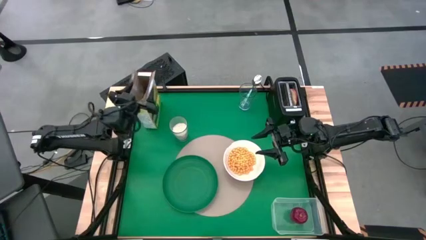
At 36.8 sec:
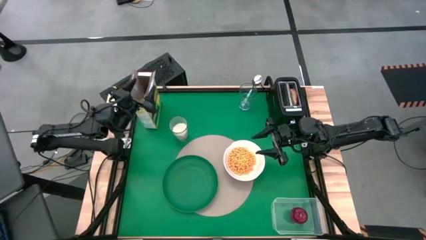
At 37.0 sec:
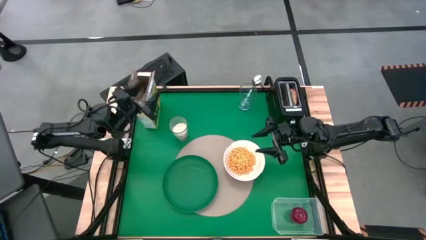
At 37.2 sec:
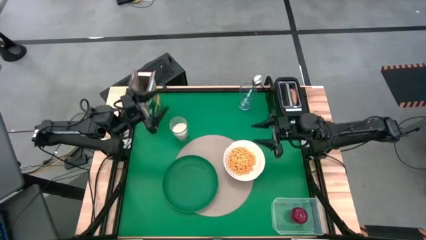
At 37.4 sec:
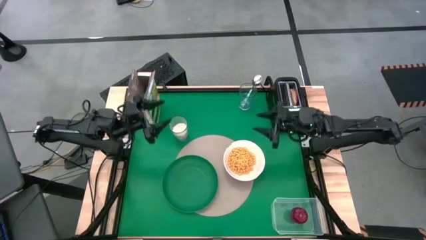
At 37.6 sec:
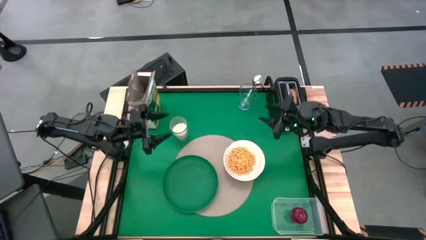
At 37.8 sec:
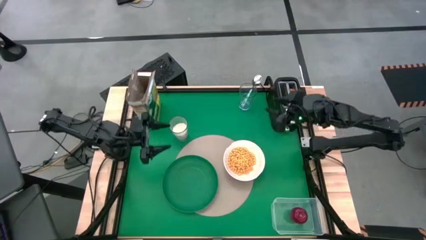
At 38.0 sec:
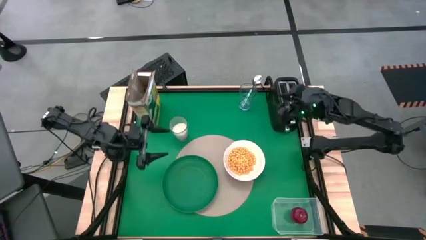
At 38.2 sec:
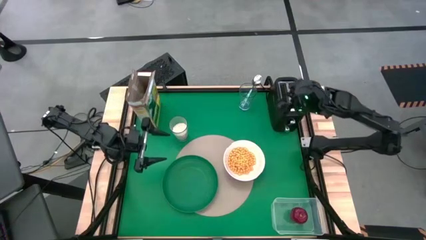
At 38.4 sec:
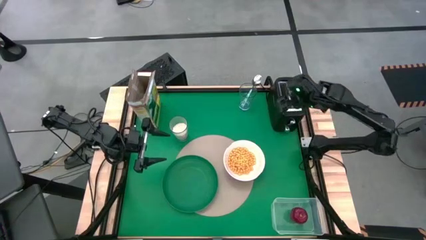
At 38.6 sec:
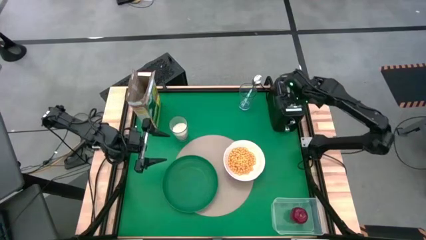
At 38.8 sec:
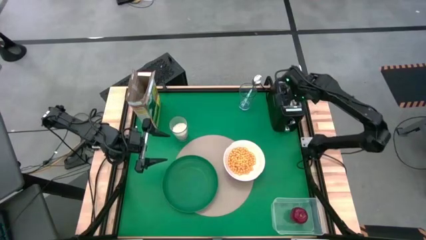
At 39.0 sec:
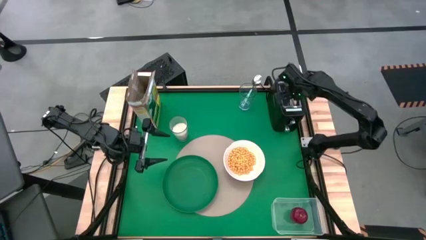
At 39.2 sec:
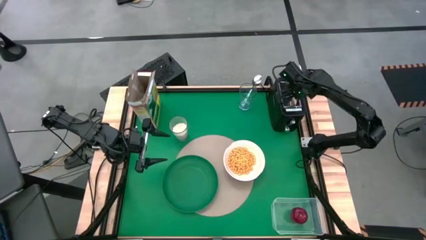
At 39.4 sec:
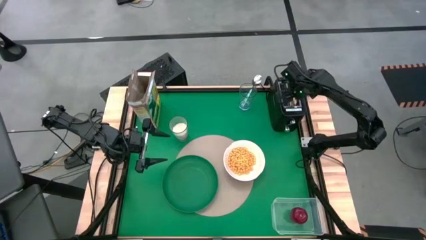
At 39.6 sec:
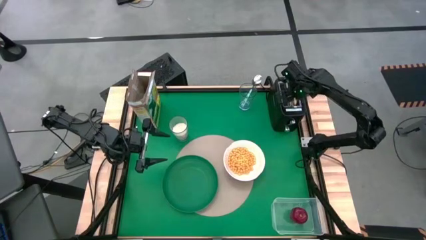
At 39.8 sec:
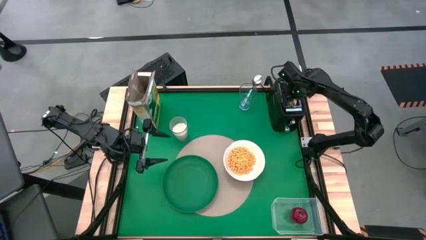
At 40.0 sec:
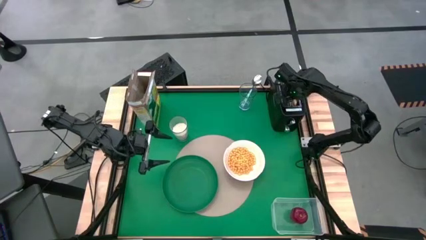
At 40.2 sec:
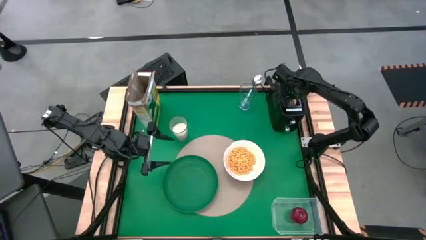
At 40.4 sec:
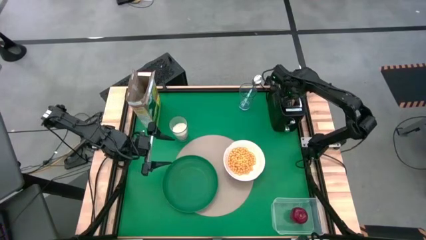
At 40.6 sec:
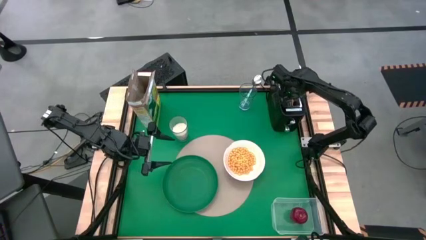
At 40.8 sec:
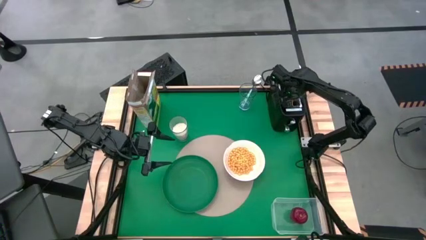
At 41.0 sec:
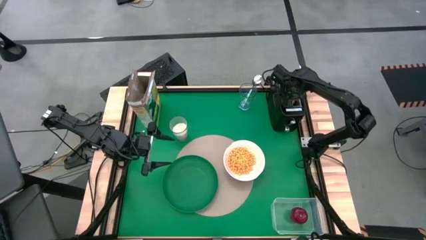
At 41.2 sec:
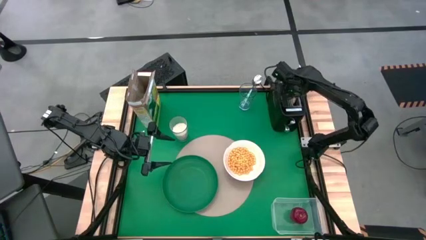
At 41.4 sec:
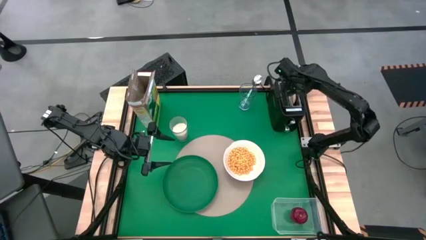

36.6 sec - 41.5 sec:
Task: Arrange a breakfast setting
Put the bagel on top of the green plate

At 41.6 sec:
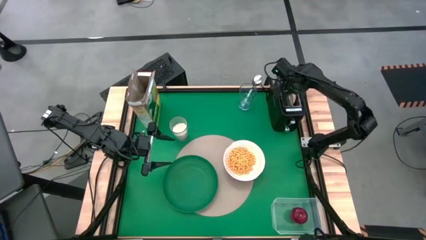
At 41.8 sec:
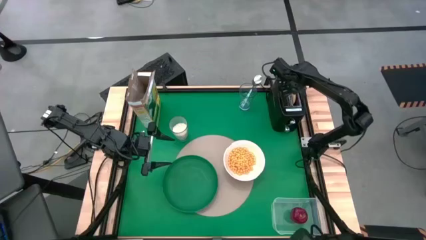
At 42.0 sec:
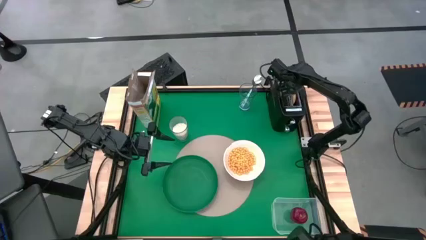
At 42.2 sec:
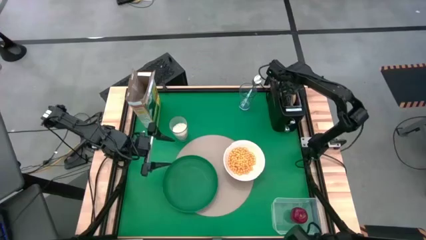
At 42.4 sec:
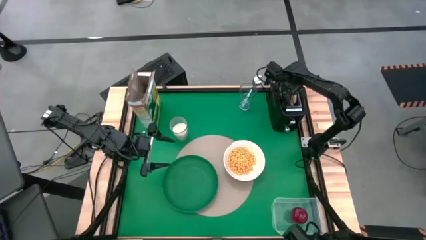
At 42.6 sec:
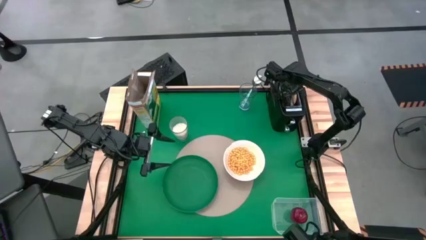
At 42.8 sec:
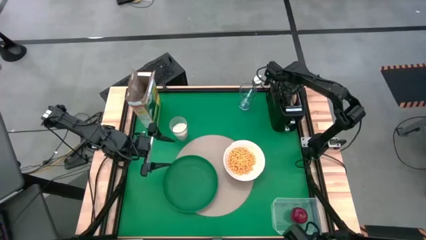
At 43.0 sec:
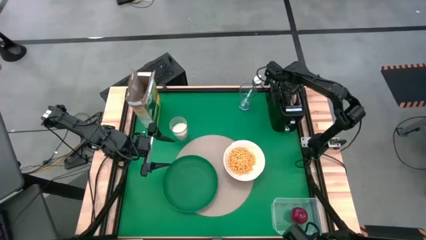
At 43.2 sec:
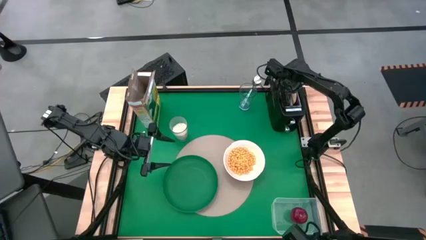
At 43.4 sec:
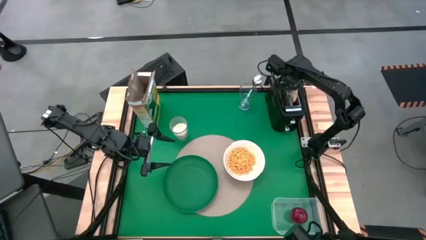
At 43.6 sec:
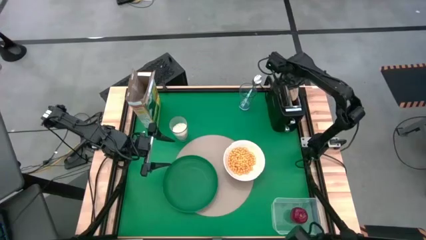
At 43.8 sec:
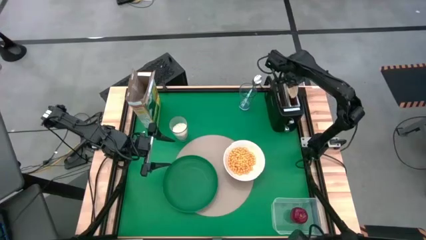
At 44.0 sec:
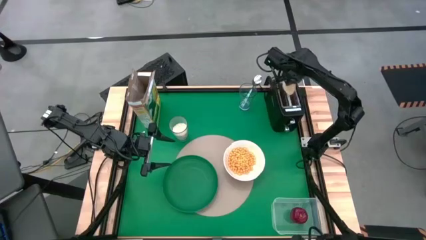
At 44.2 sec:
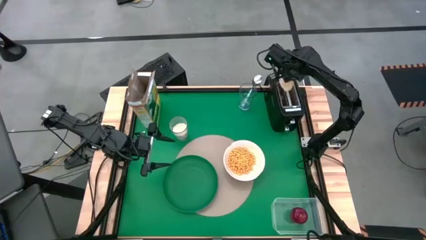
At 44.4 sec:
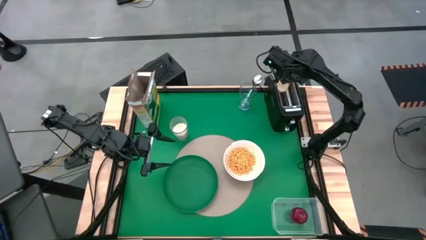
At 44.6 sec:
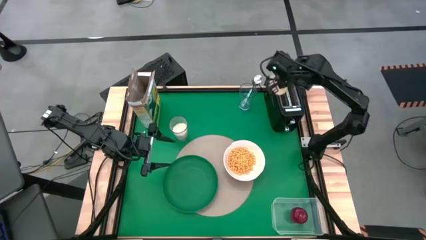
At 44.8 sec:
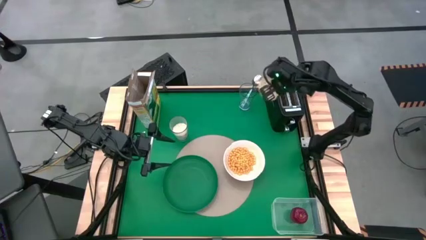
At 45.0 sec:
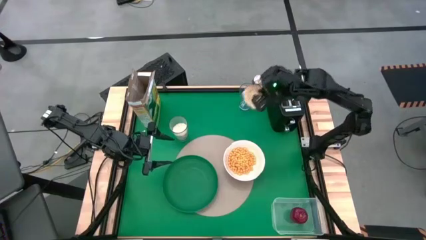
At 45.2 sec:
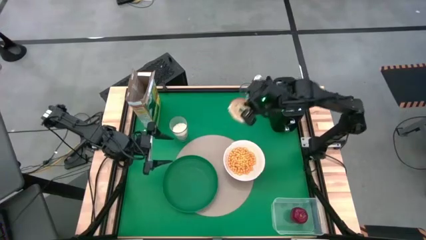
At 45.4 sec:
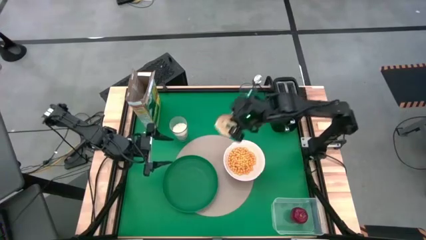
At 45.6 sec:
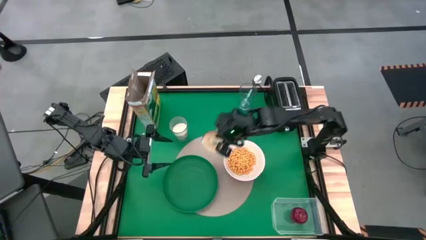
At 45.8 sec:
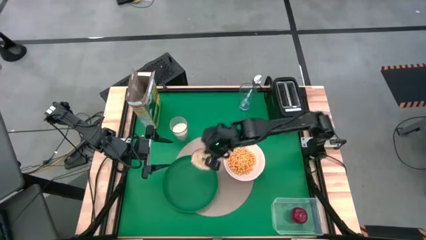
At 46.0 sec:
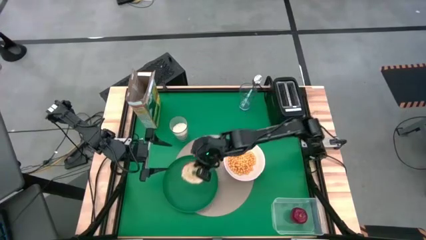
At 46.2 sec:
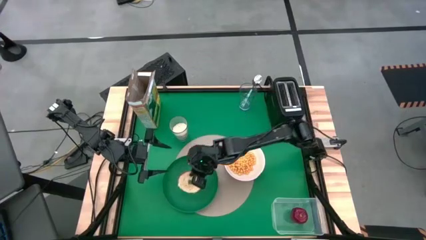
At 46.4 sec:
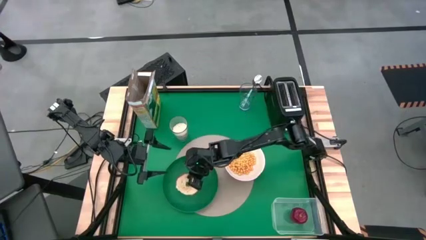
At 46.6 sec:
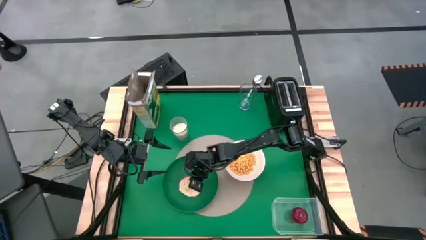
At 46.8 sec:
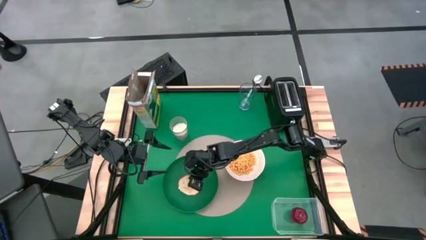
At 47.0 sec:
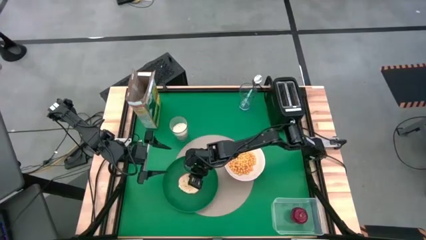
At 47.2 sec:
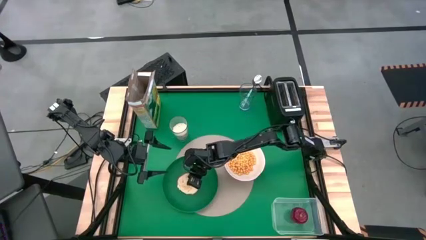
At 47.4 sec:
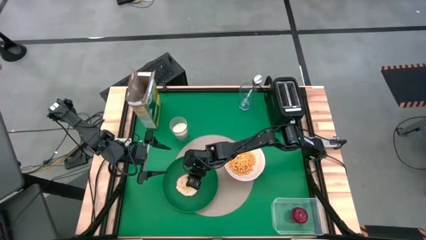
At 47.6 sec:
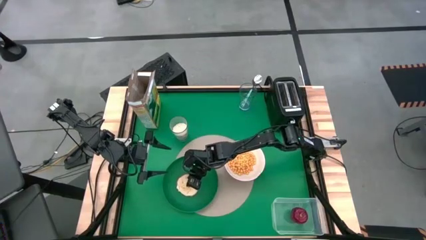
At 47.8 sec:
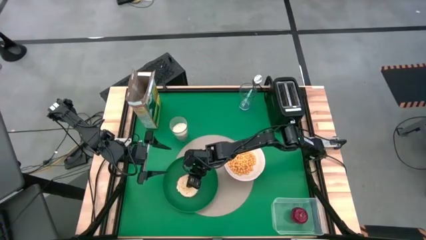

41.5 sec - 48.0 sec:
Put the bagel on top of the green plate

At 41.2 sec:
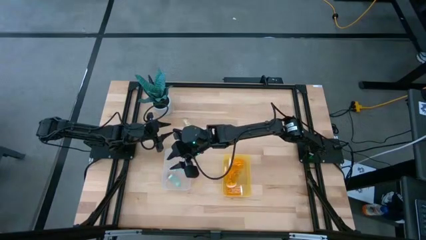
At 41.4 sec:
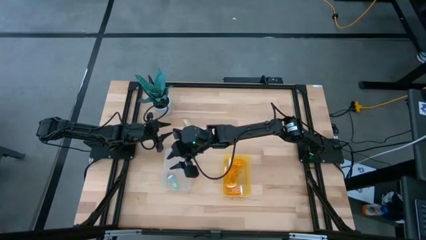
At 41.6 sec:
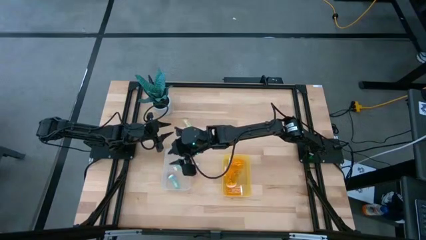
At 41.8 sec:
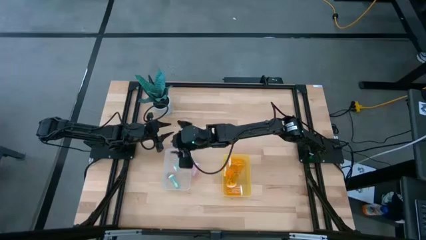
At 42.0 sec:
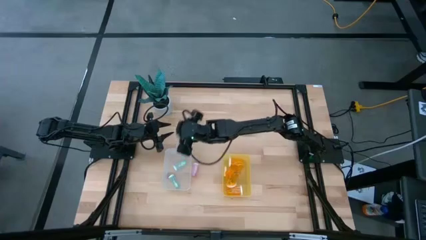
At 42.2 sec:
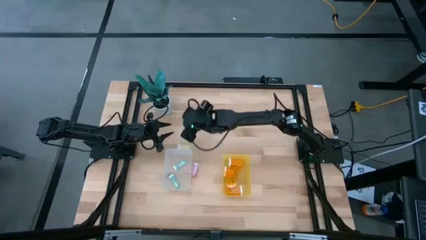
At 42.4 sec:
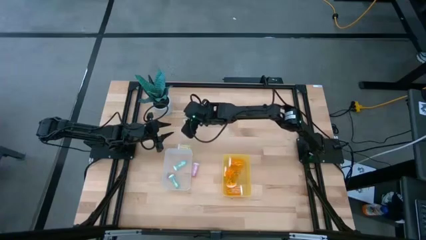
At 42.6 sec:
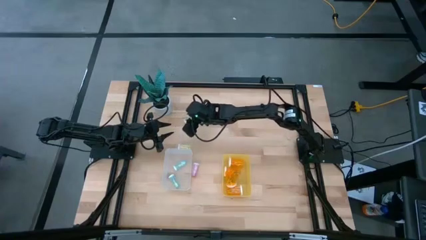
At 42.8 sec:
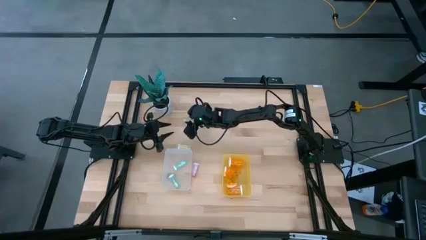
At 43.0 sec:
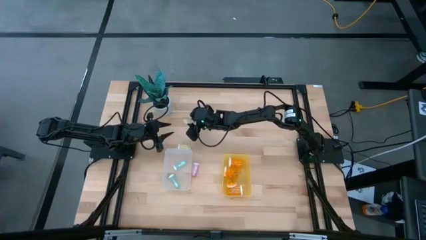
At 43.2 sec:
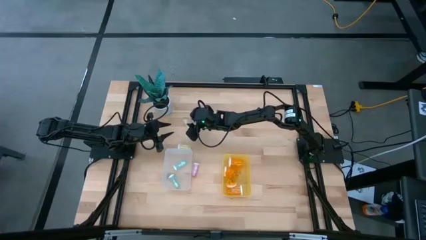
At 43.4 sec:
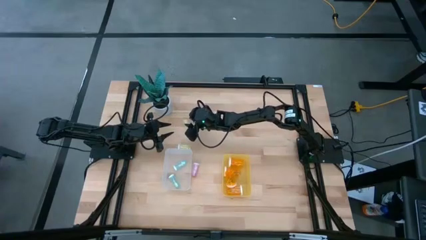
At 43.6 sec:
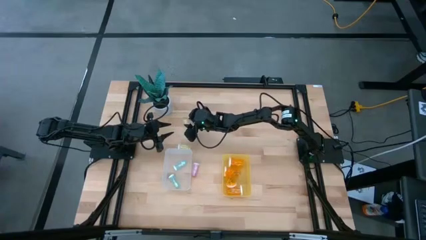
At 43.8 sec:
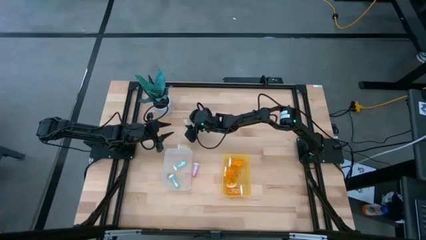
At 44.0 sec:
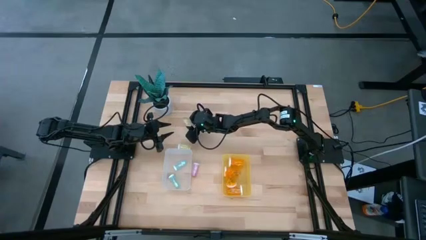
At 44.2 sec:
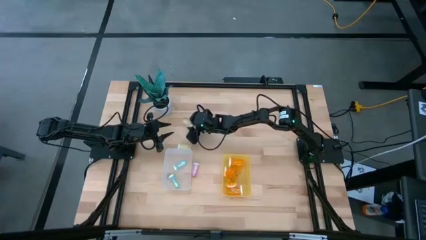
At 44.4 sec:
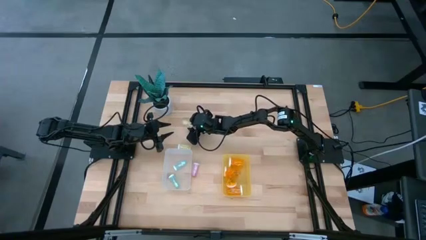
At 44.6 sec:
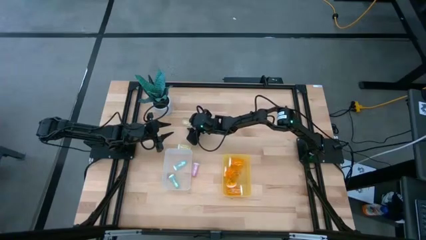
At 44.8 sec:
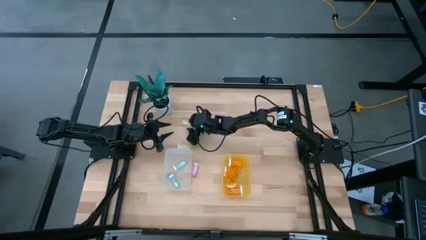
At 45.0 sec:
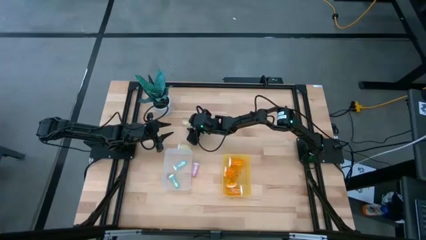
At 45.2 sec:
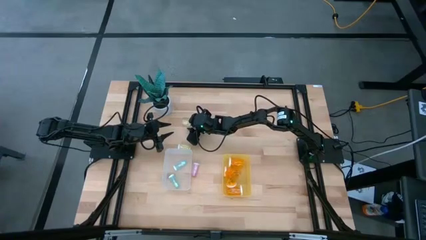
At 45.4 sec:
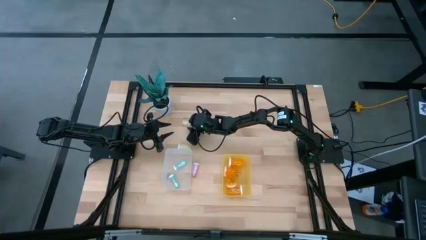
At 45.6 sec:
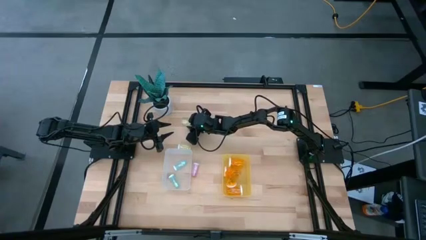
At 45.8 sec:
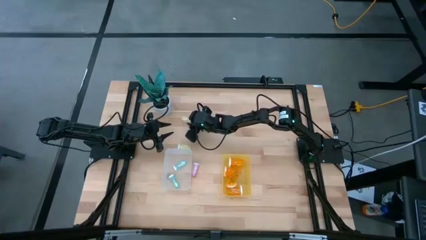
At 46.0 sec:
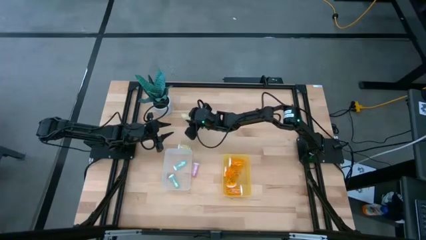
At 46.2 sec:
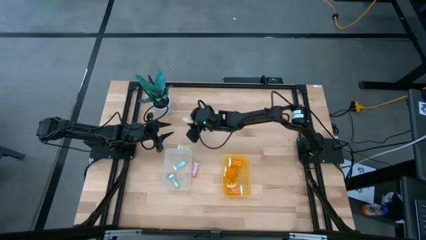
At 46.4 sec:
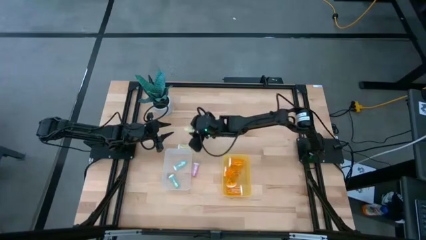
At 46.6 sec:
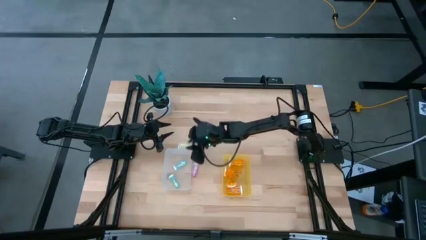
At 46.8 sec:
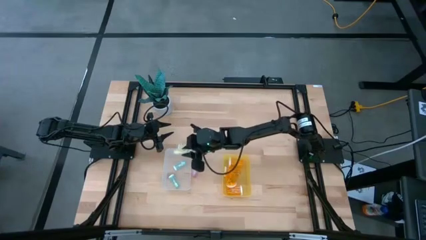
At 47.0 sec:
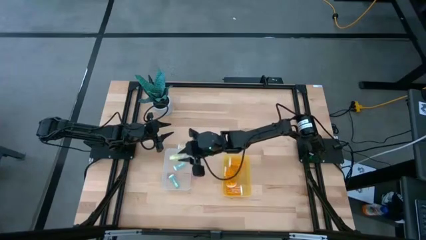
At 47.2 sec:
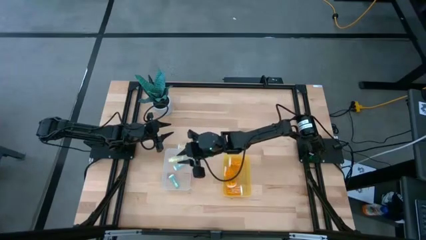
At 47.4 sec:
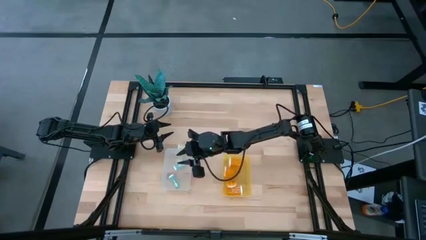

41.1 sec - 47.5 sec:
Task: Pick and place medicine bottles into bin by pill shape (circle, oval)
Put the top yellow pill bottle into the transparent bin
